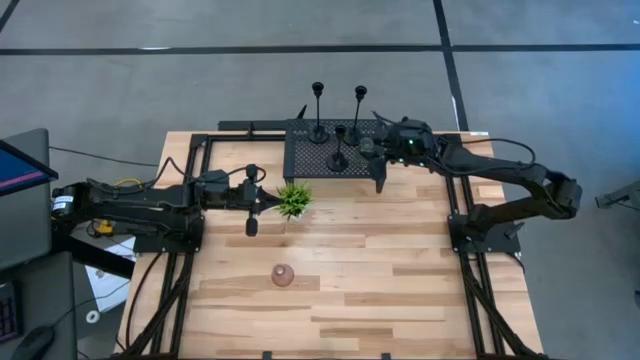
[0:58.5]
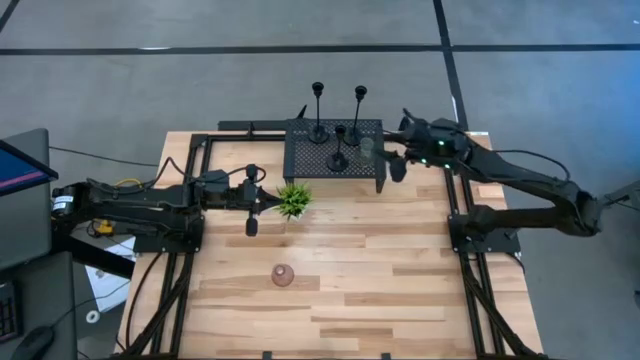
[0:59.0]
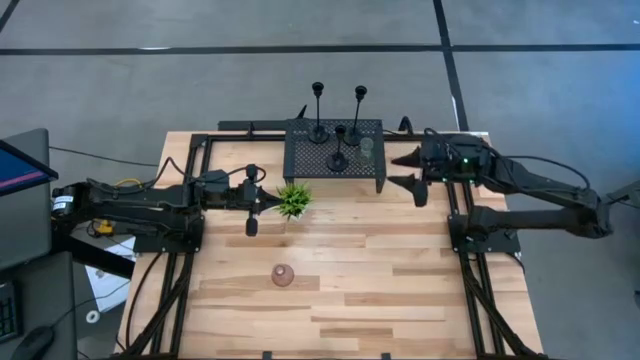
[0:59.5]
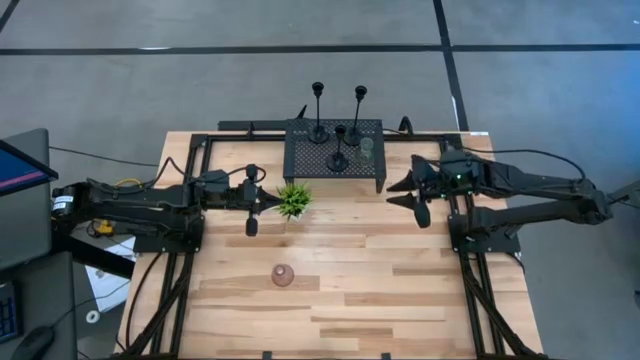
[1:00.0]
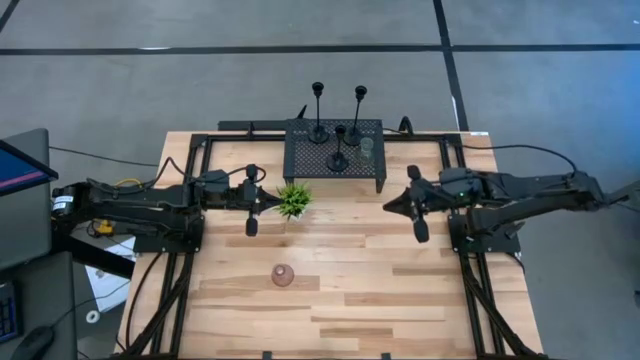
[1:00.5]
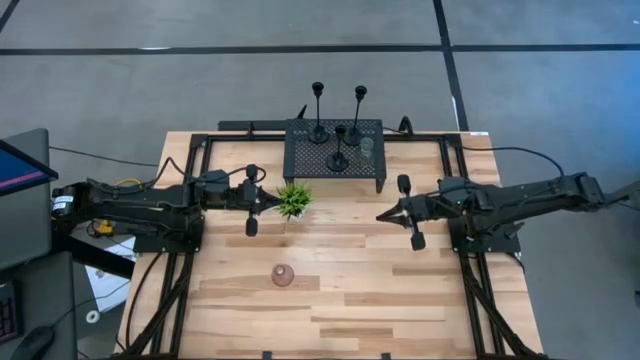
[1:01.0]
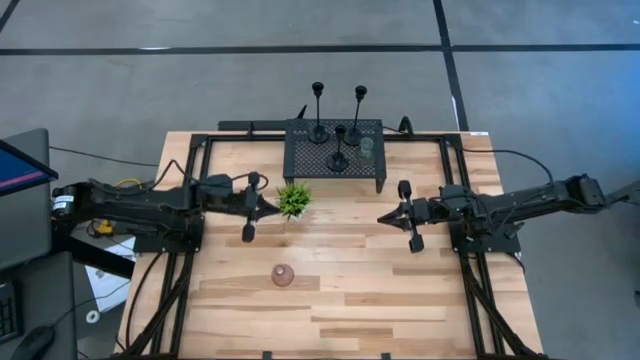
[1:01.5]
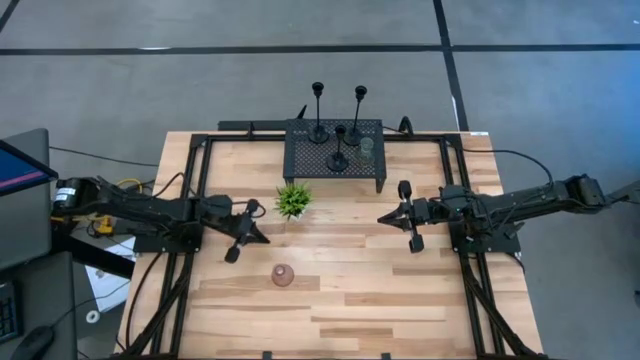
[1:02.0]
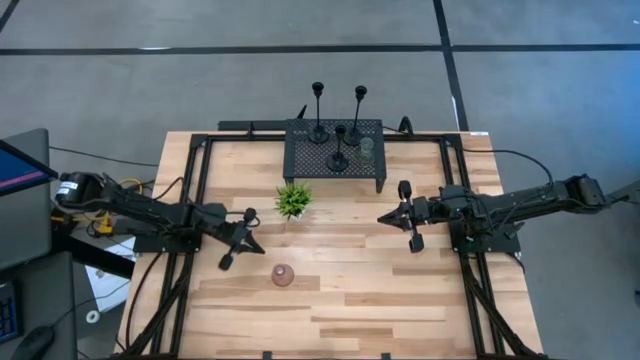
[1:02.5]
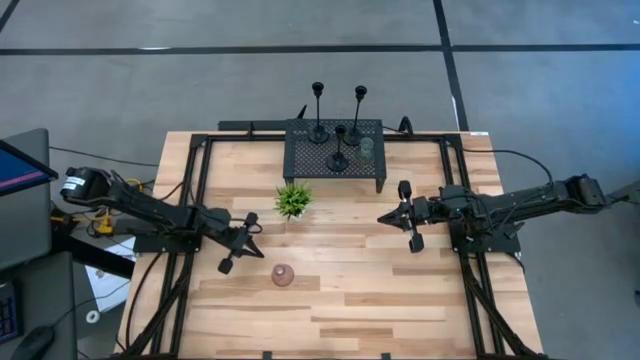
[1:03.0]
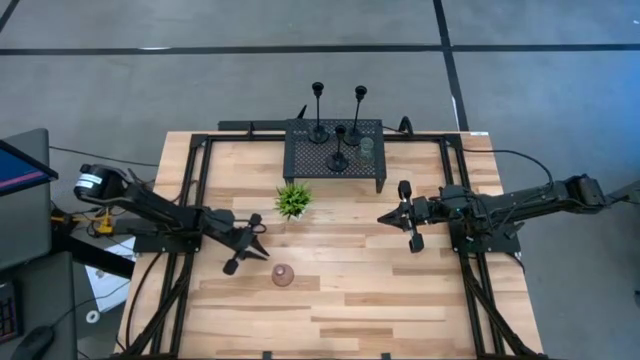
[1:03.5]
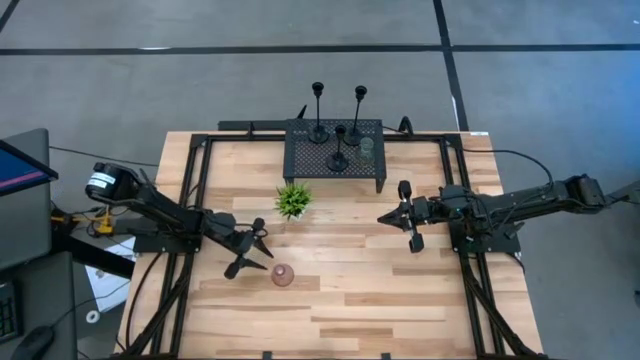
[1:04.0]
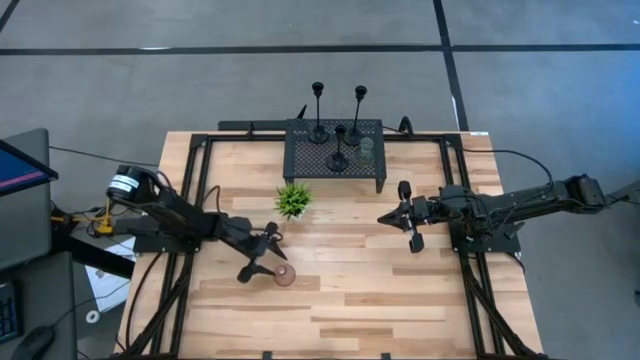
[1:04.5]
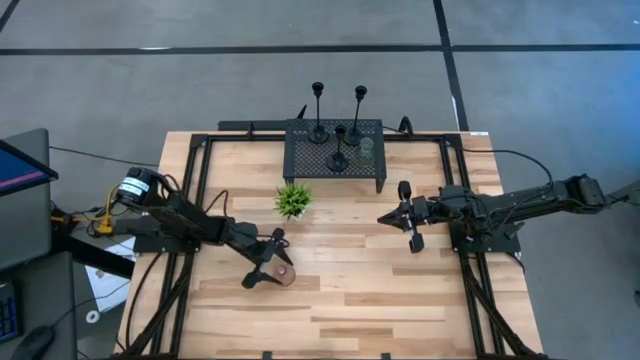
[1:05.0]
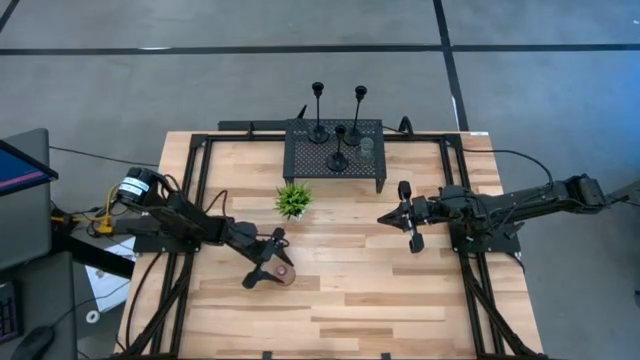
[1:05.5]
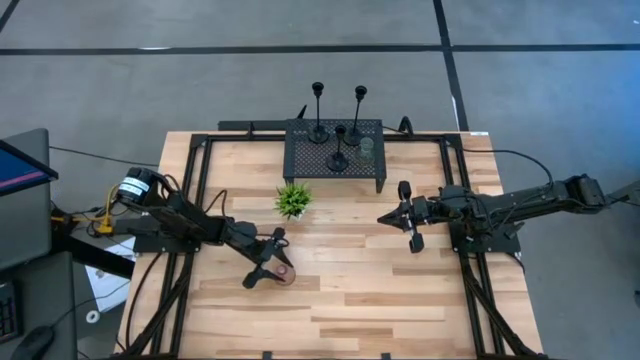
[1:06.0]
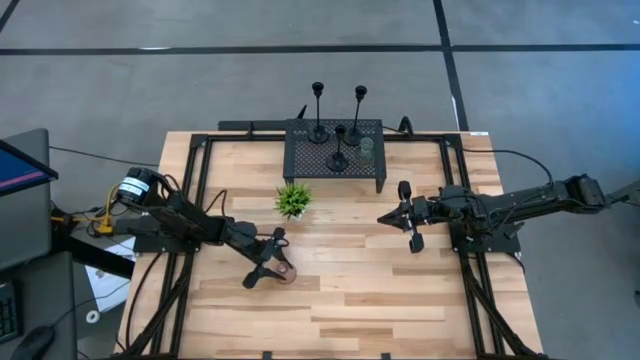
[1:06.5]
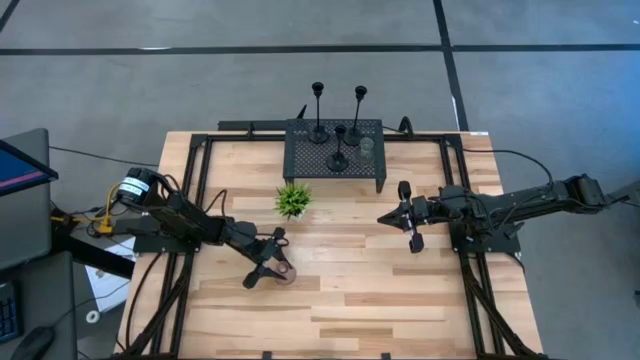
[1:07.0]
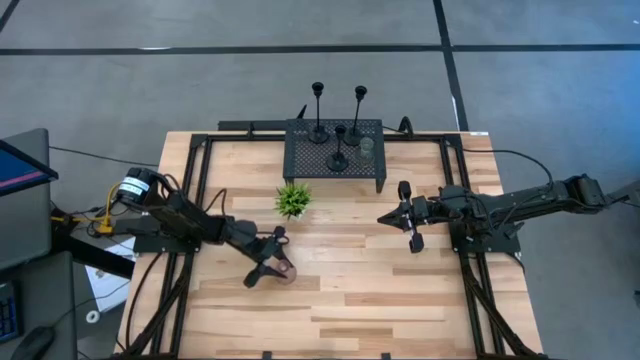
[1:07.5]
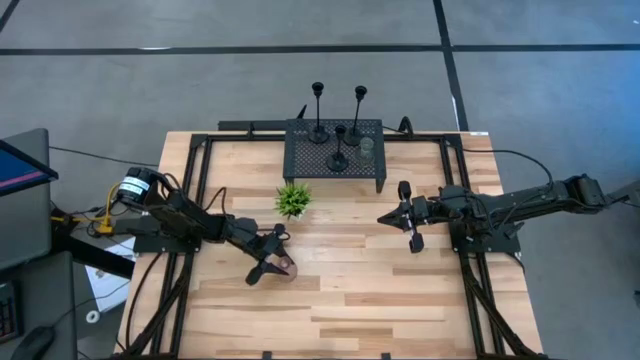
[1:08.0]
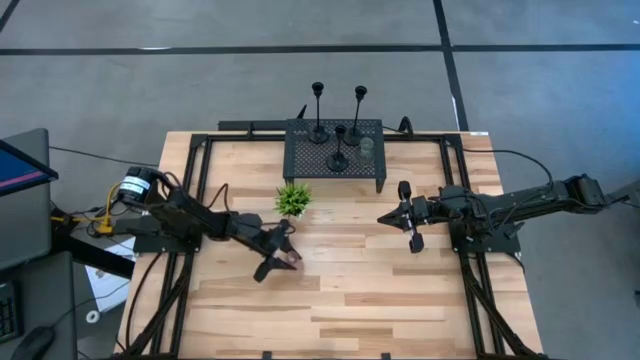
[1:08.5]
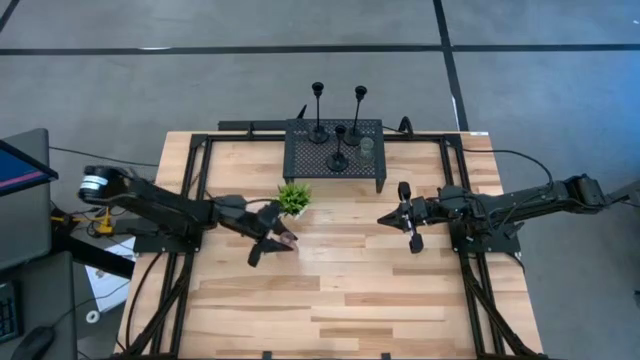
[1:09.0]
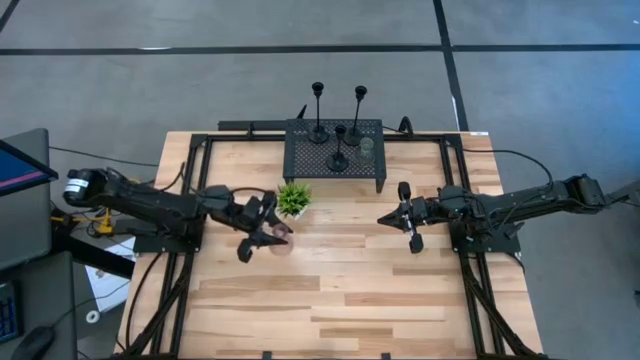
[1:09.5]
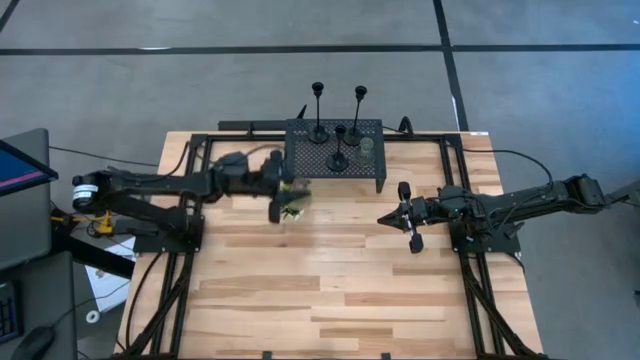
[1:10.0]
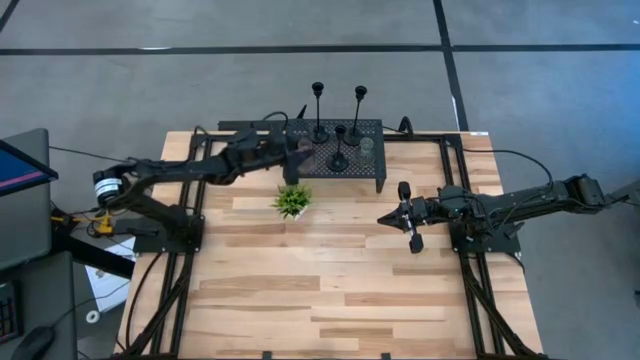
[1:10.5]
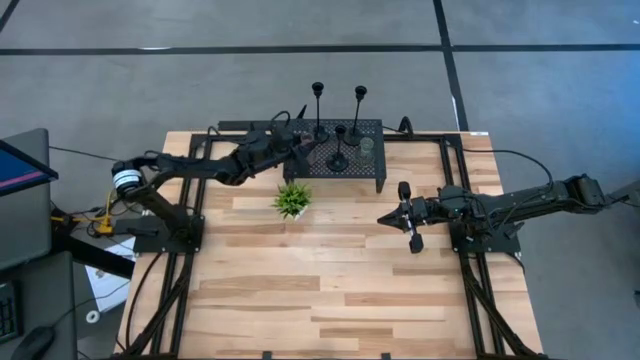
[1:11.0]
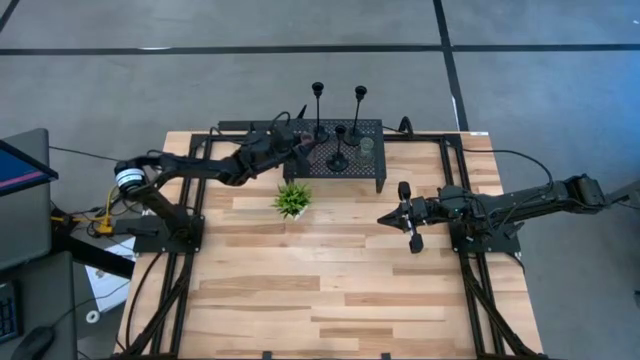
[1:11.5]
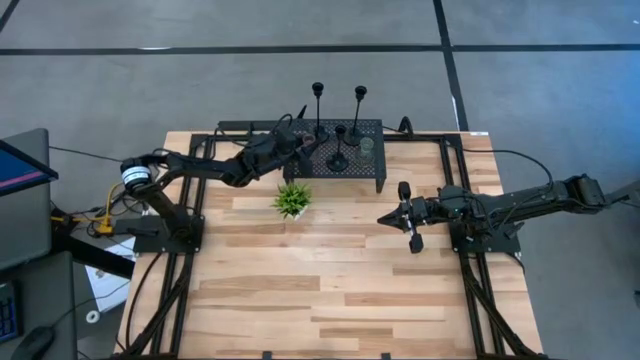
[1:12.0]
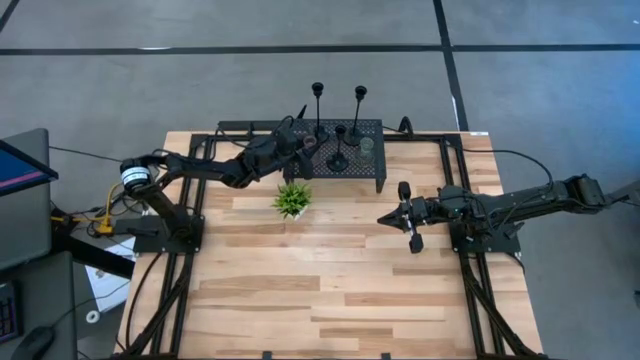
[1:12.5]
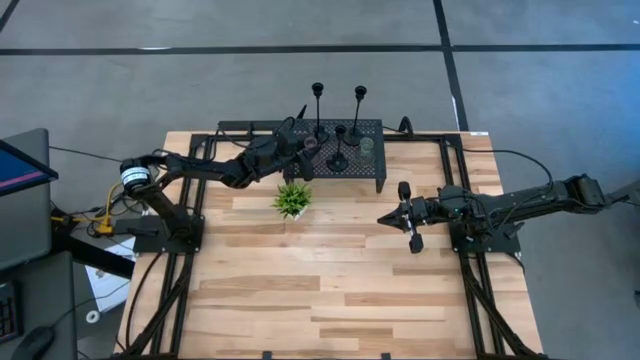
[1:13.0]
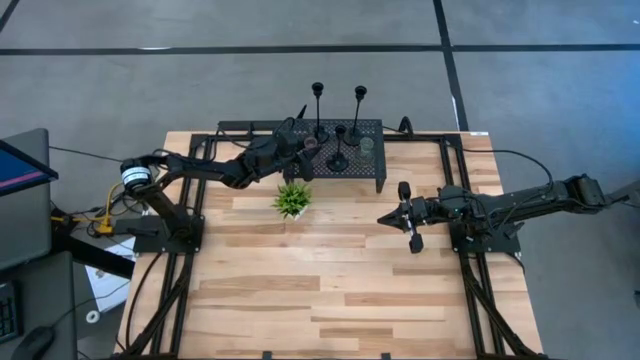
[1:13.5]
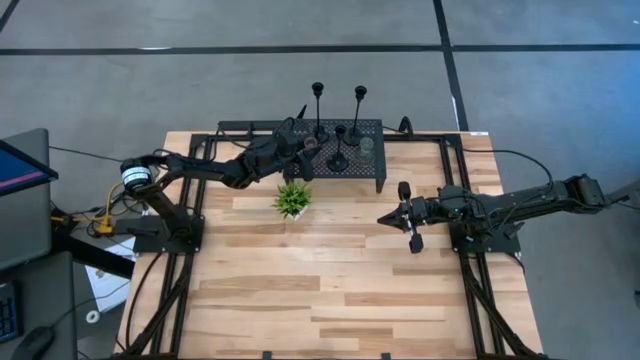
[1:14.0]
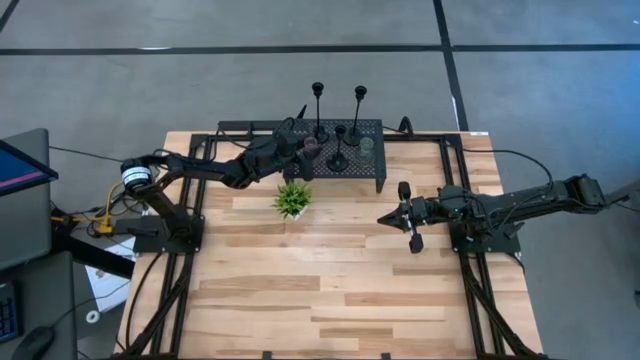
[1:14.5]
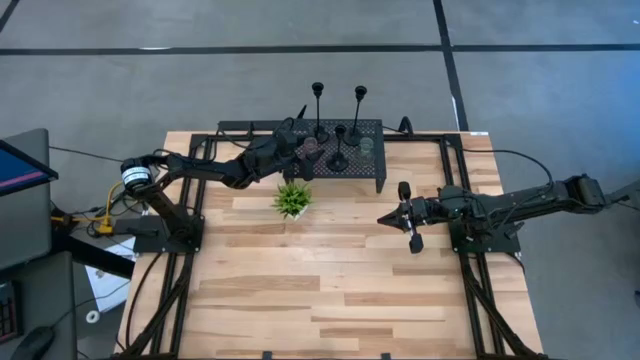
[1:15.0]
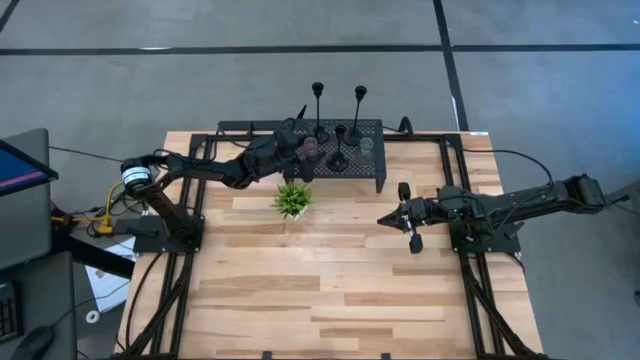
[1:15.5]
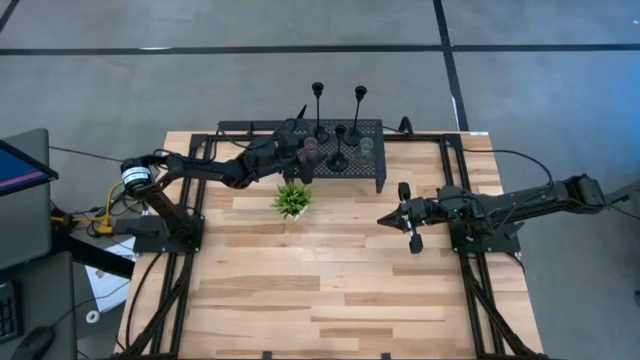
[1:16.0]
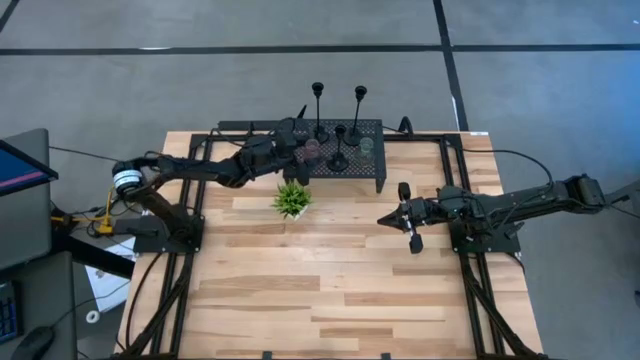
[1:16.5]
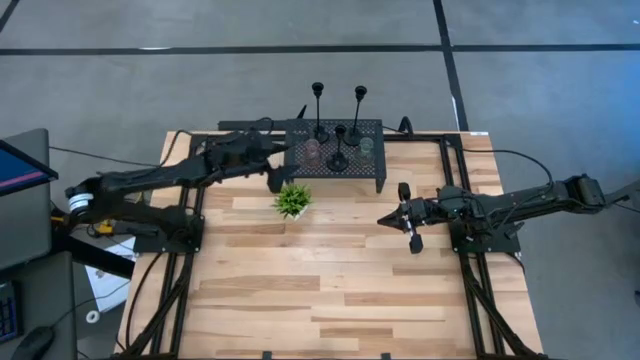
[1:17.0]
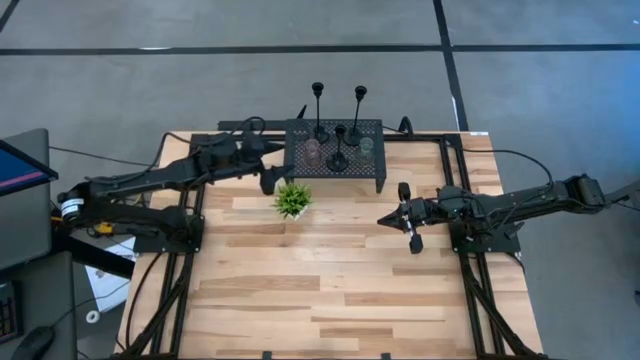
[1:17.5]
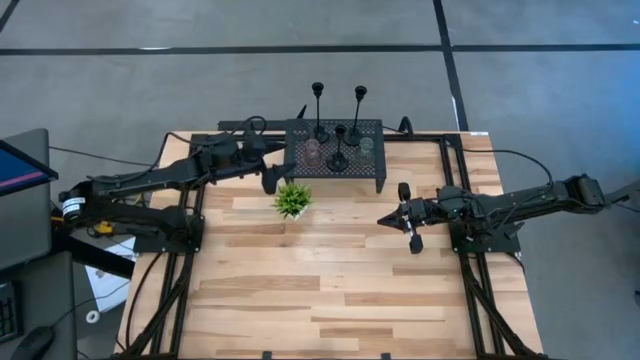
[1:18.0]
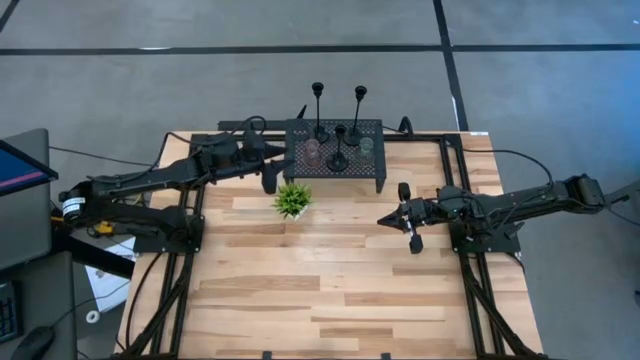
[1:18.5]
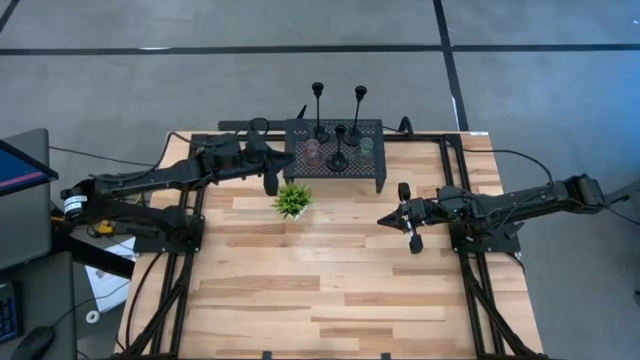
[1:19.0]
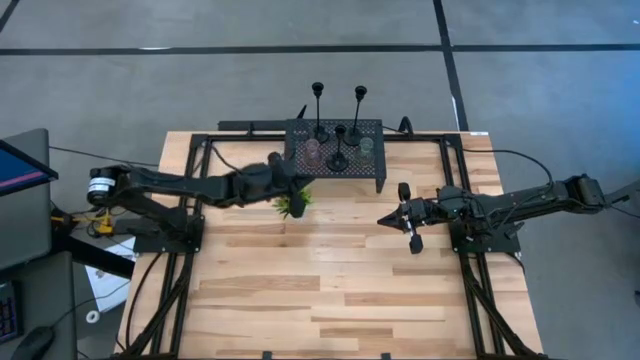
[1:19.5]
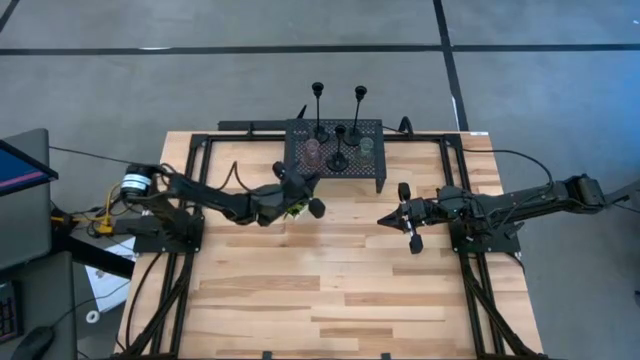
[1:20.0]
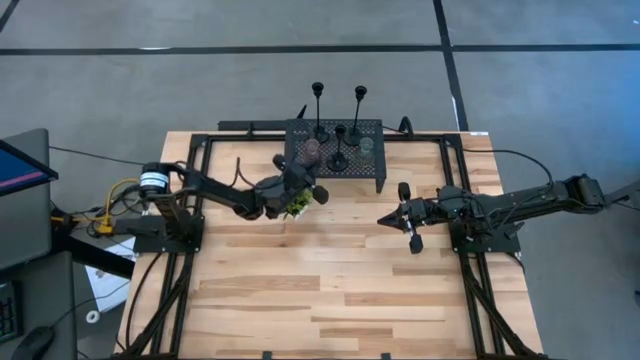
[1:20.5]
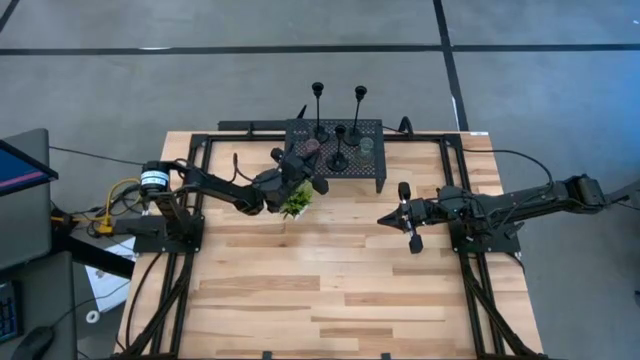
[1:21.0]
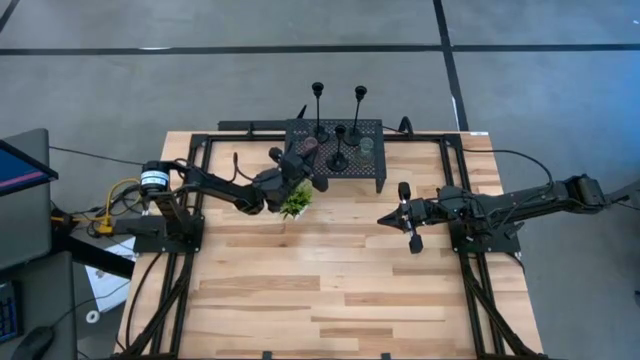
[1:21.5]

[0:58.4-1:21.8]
Task: Pick & Place candle stick holders
Put the pink glass candle holder on the shelf
